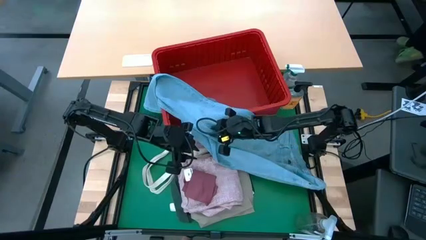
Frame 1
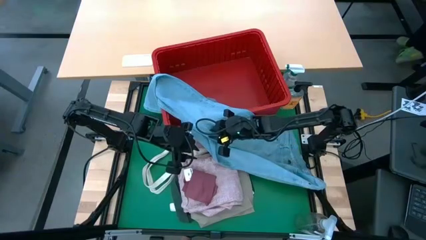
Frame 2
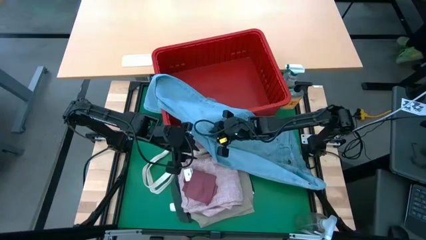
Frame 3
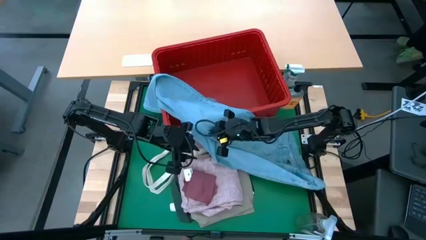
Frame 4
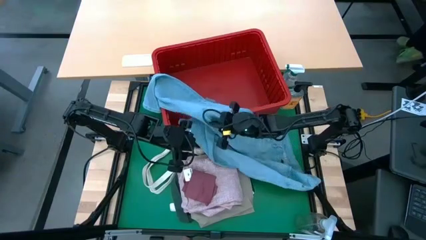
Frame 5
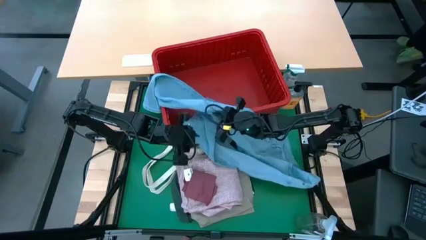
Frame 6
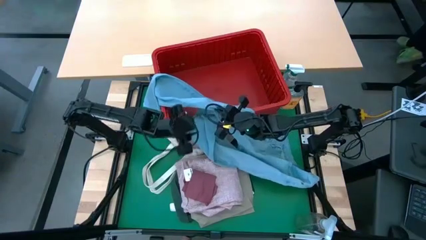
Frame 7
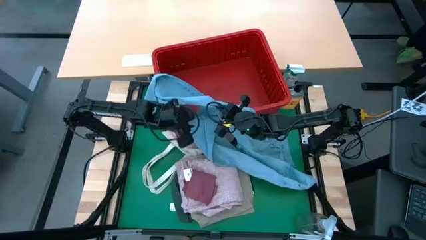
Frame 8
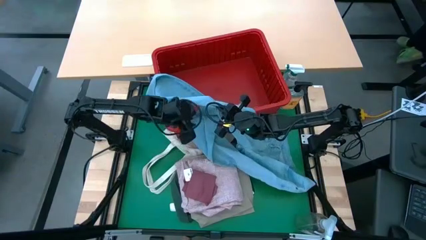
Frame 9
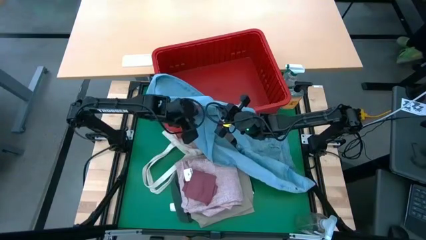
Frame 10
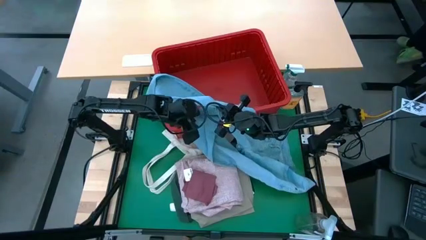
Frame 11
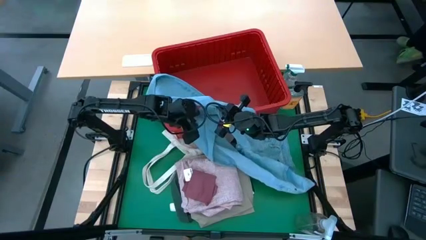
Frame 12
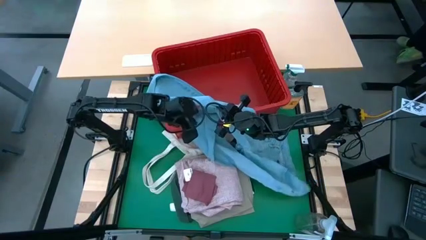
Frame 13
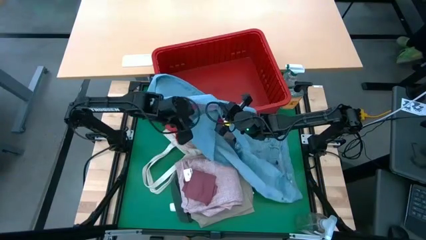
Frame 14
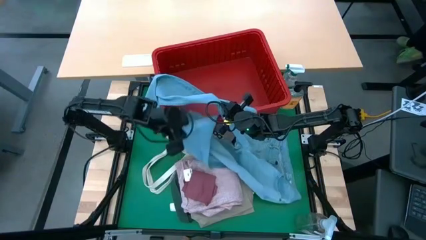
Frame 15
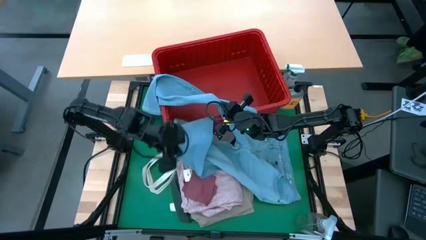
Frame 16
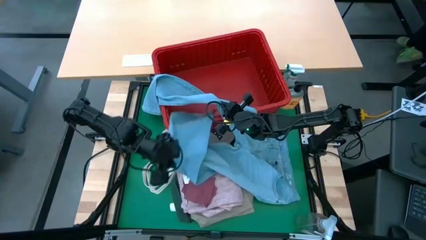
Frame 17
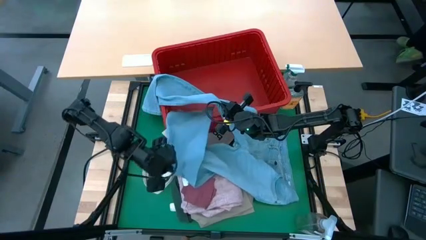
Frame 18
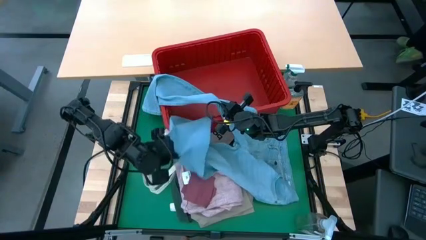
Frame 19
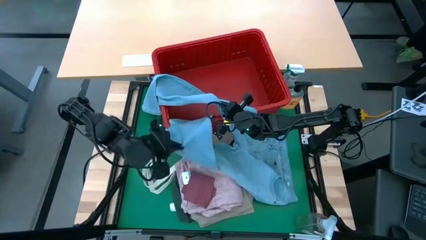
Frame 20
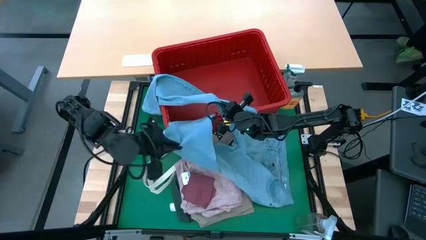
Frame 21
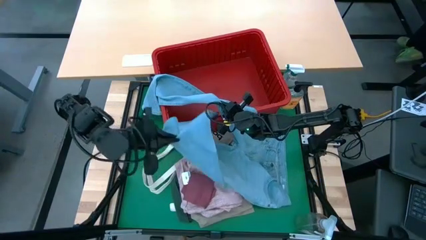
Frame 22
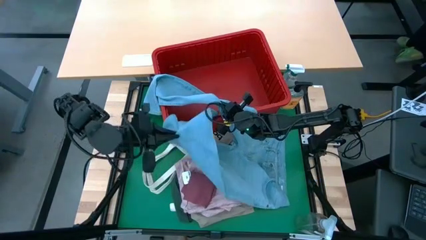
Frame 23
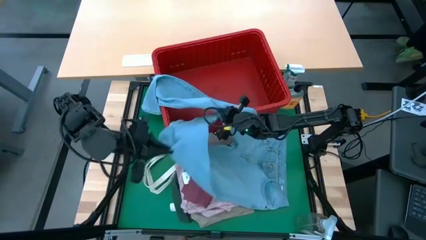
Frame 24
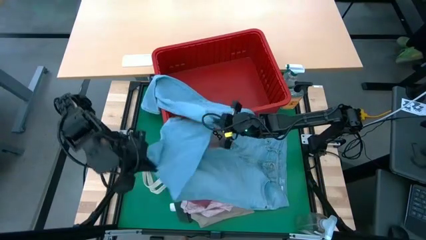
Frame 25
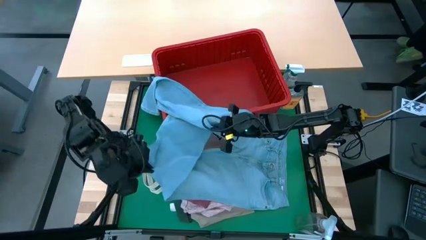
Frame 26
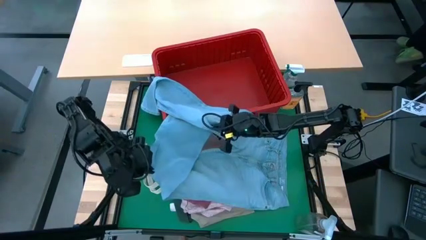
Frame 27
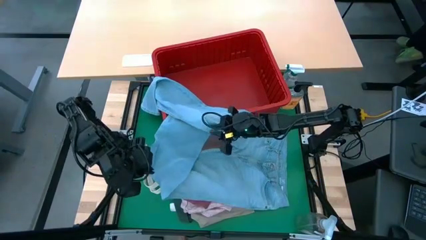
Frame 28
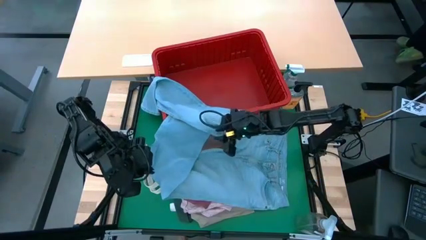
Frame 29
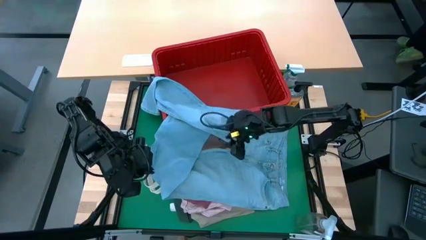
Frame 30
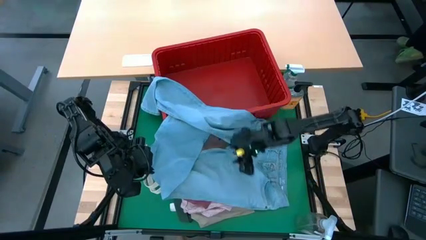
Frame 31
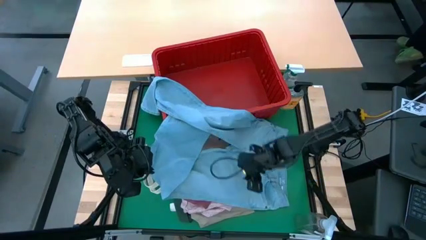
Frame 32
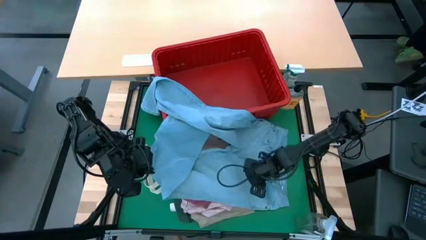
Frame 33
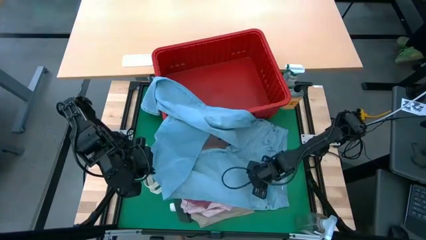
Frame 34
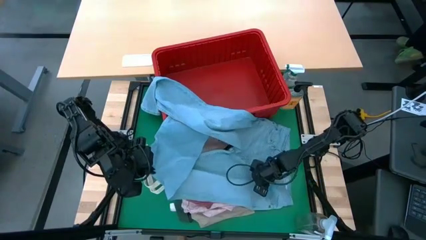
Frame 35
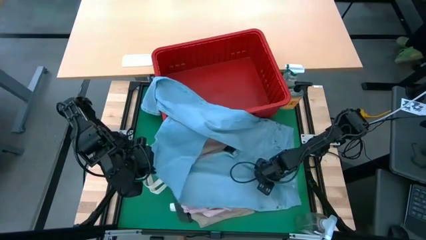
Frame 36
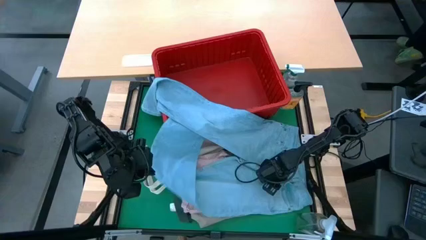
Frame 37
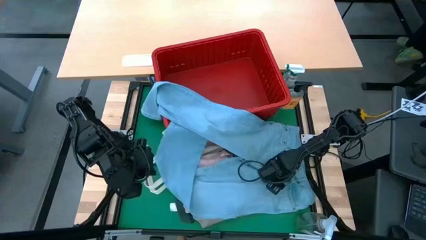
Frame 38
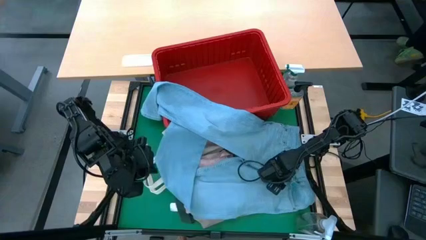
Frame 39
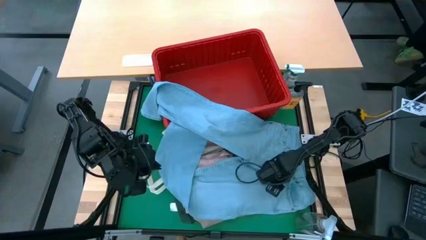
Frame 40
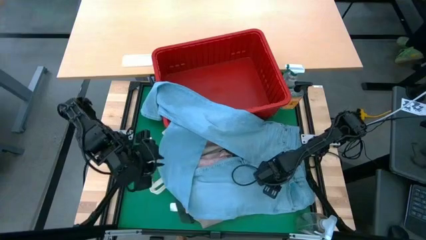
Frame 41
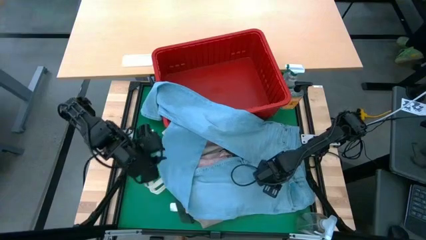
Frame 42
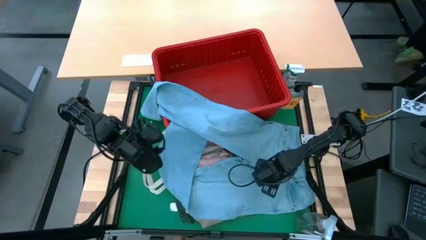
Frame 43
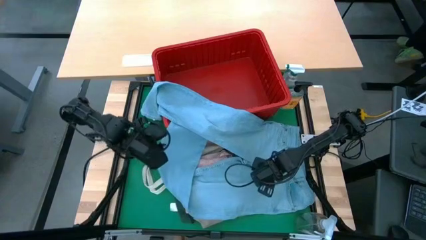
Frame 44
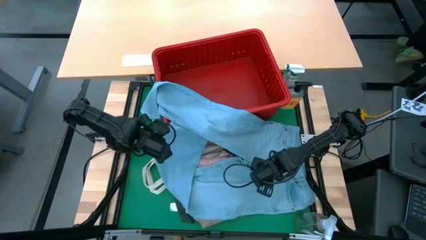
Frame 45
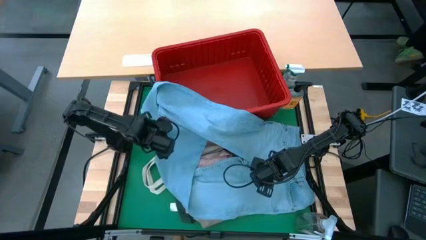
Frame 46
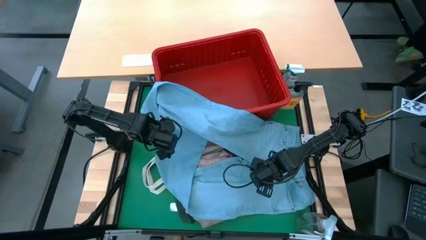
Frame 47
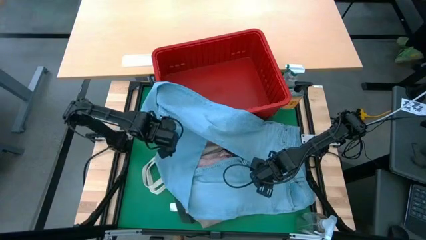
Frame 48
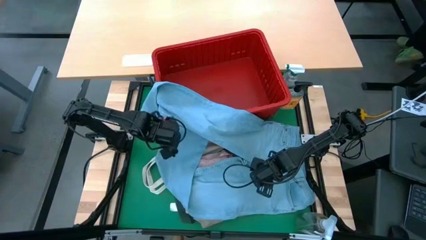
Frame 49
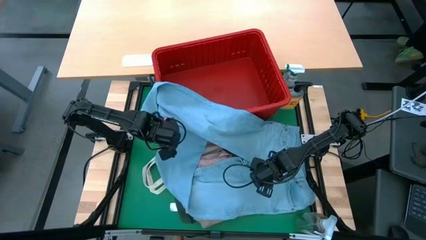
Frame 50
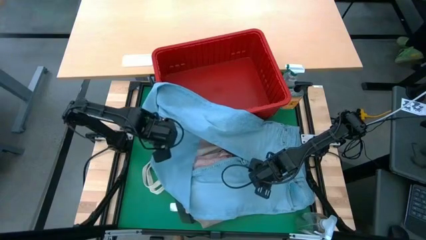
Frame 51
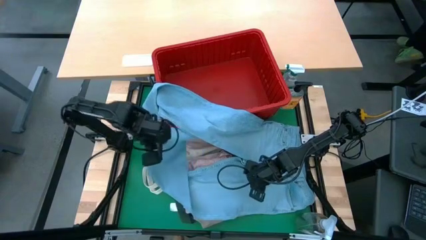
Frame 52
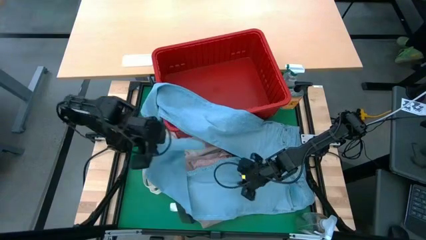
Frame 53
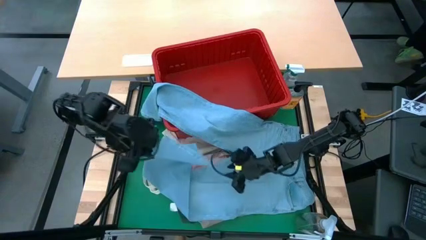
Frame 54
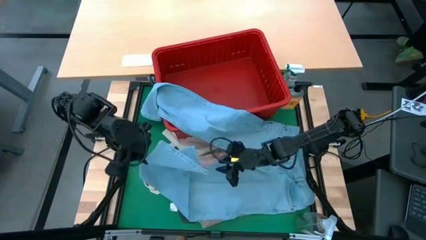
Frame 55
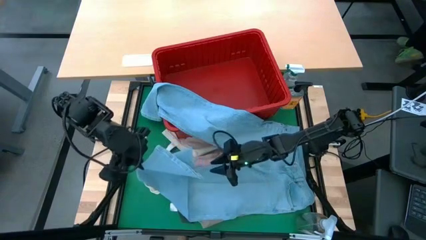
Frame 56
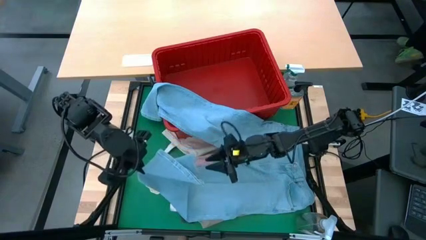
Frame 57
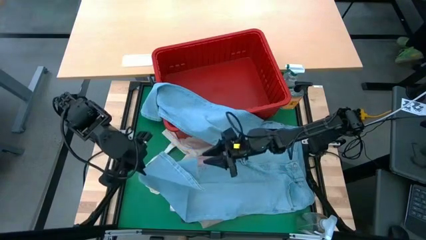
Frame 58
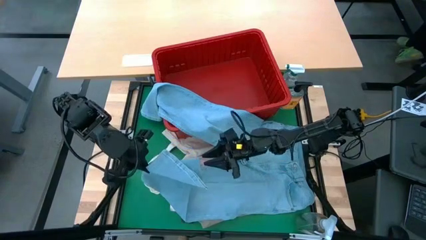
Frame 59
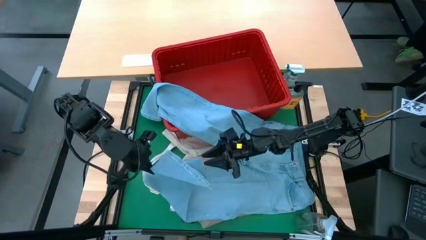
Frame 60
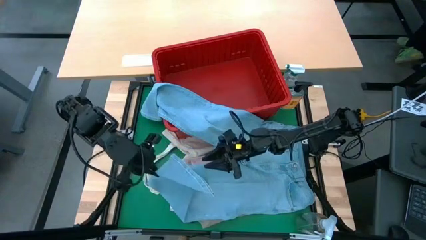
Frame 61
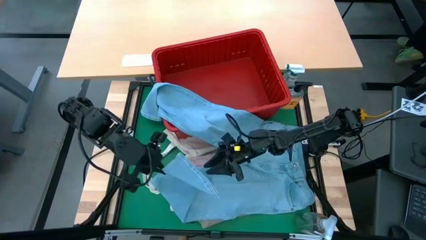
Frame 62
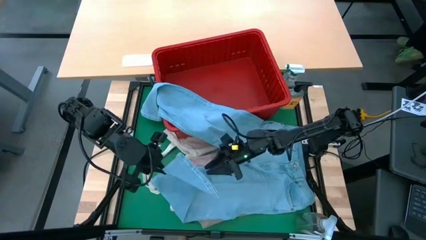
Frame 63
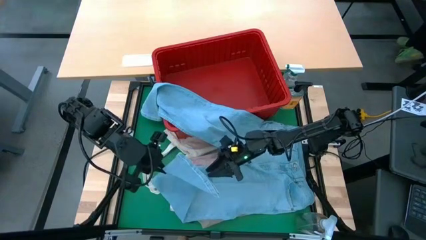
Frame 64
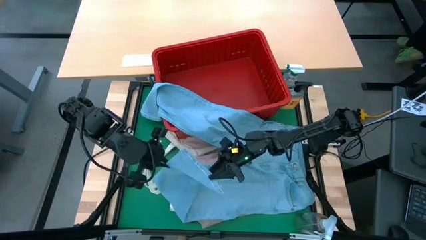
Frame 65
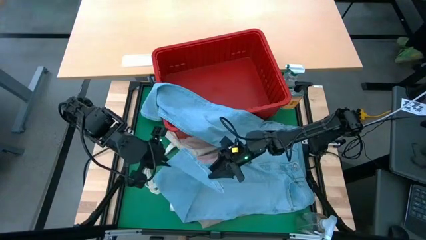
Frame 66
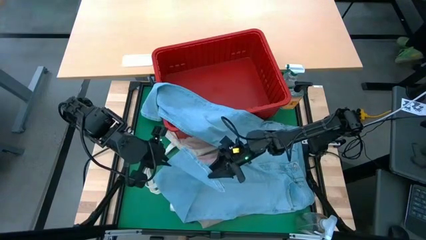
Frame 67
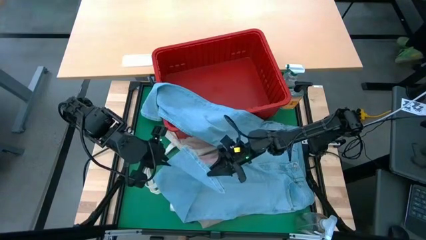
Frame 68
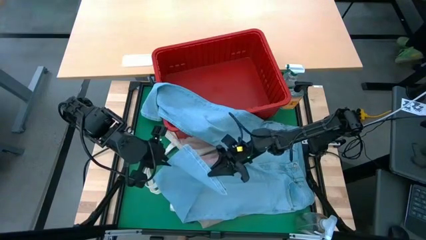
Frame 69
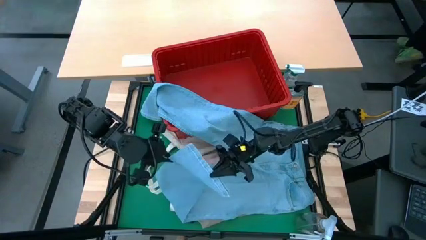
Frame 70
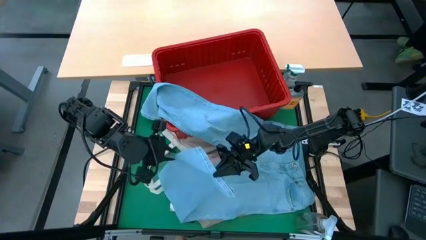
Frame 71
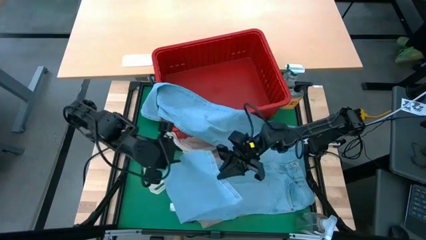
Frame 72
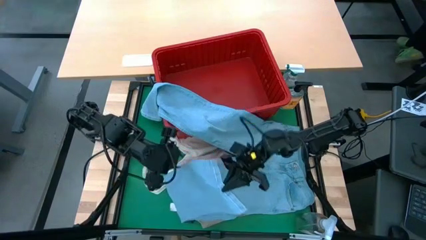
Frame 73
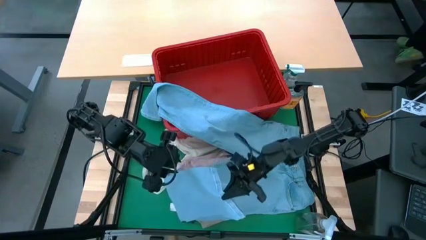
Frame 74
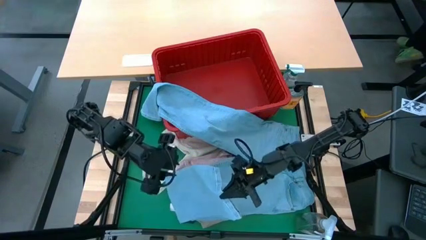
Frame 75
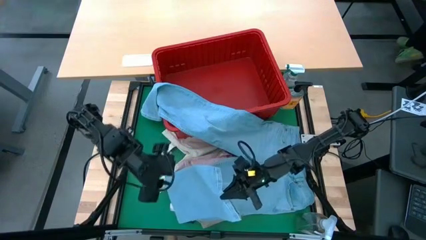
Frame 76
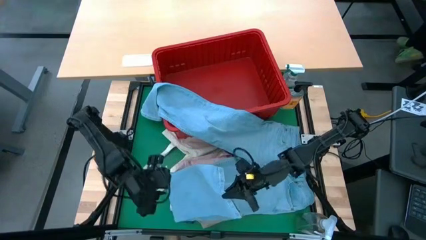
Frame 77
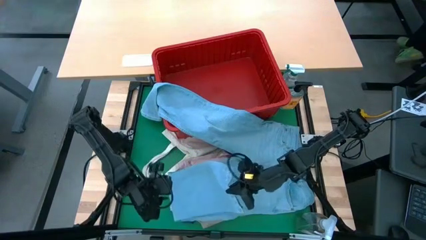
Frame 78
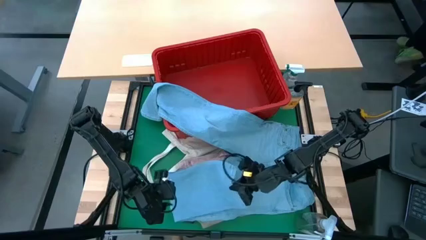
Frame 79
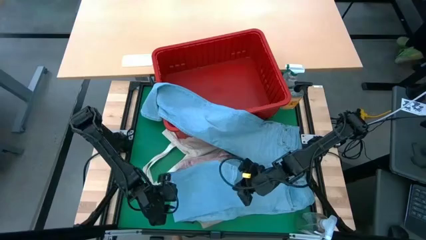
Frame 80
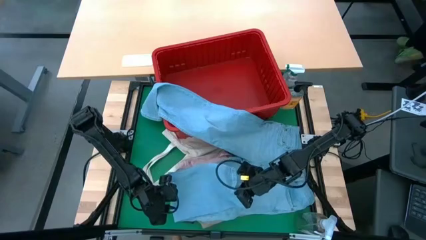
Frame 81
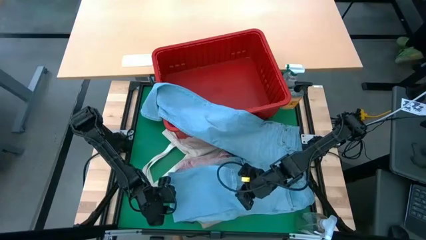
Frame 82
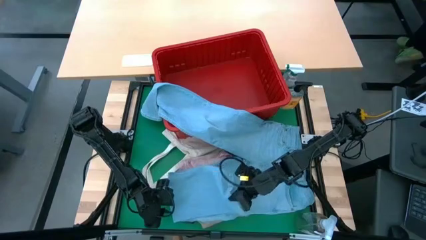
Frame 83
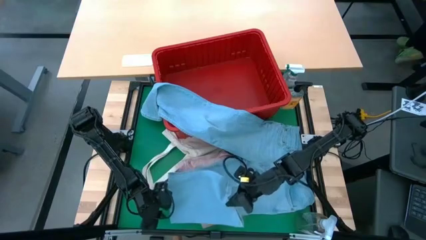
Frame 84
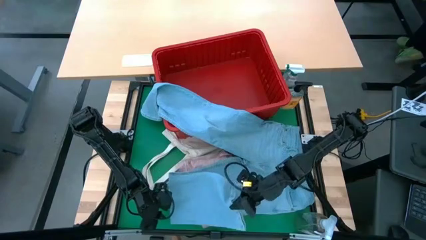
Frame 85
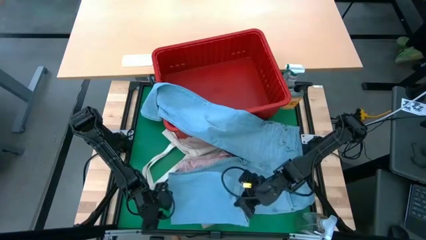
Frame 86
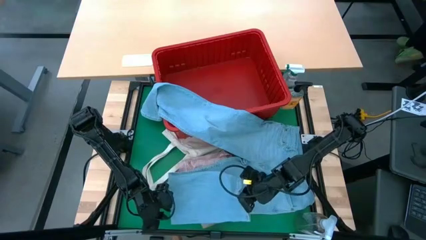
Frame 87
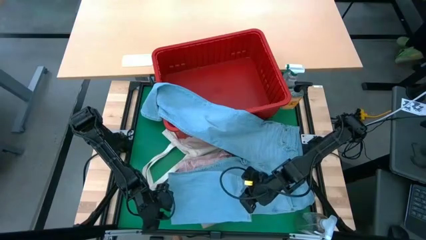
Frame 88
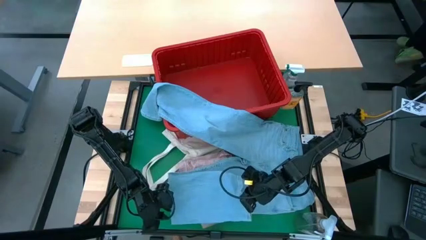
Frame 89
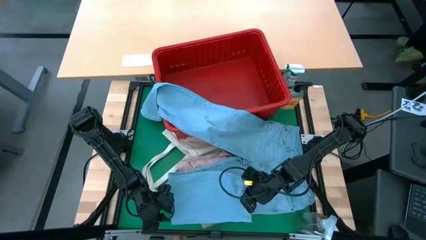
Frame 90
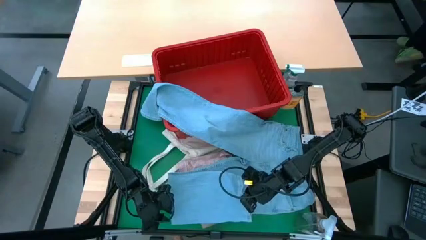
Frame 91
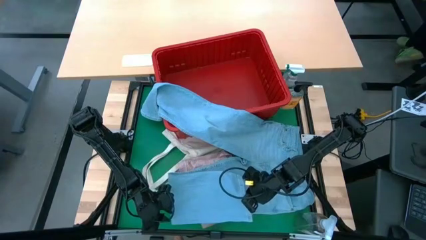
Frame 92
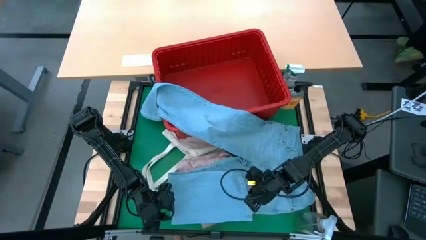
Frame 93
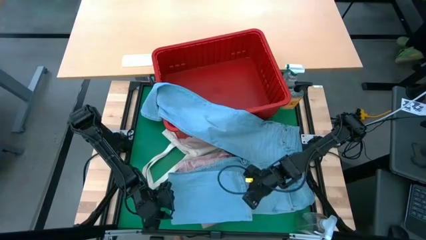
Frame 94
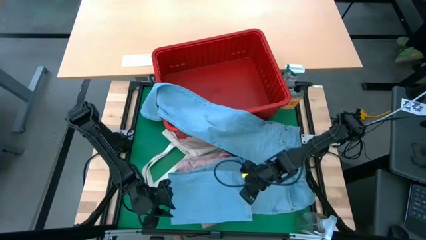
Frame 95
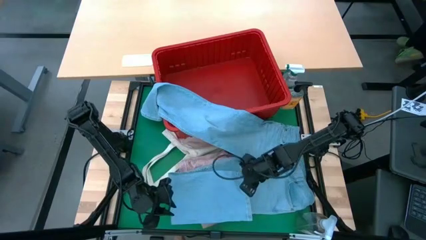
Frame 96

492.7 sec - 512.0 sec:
Task: Fold laundry
Fold the blue jeans
